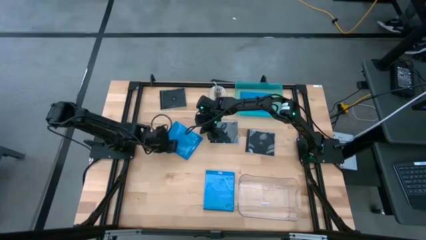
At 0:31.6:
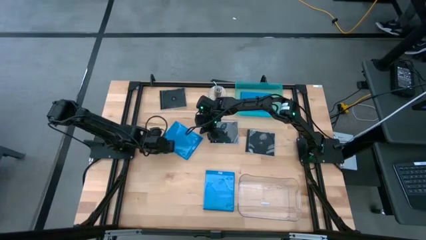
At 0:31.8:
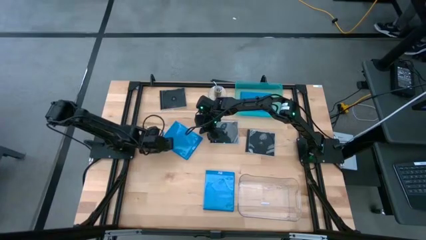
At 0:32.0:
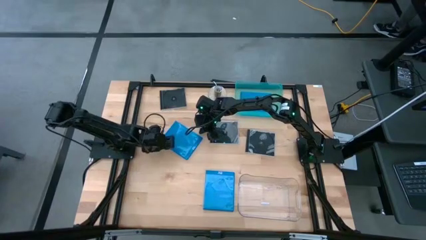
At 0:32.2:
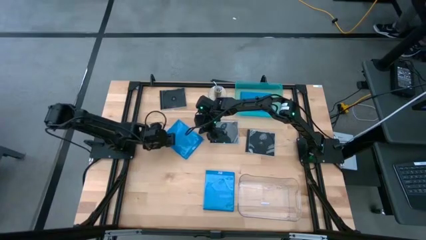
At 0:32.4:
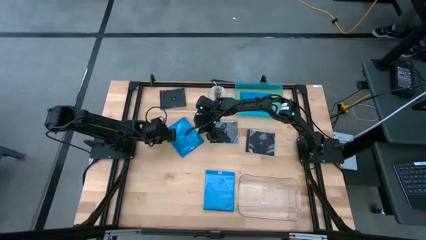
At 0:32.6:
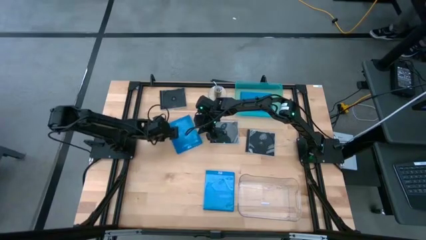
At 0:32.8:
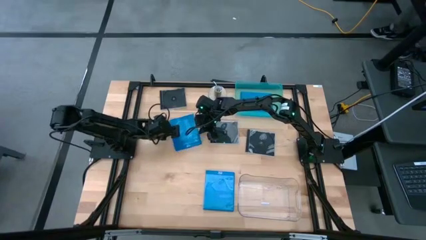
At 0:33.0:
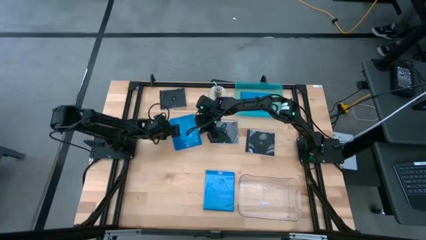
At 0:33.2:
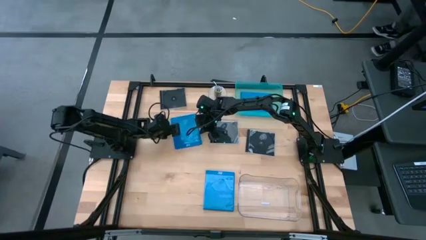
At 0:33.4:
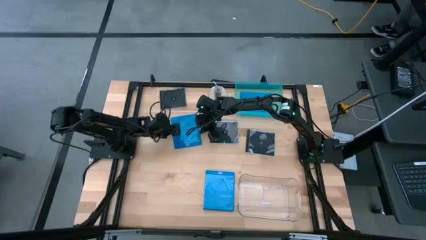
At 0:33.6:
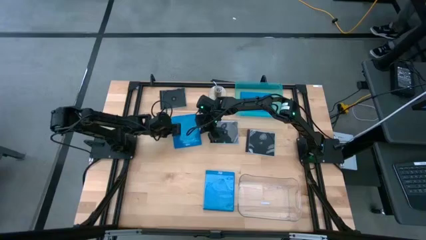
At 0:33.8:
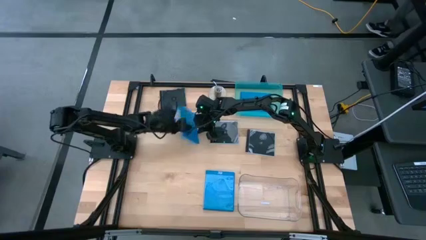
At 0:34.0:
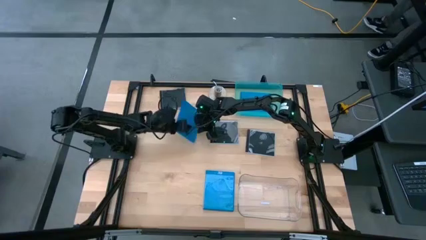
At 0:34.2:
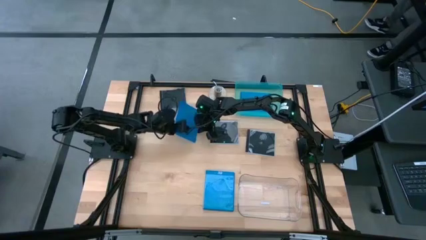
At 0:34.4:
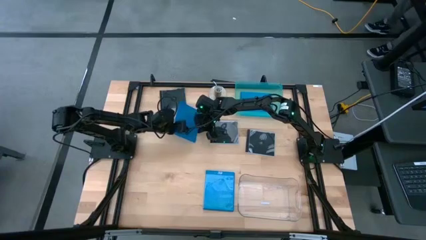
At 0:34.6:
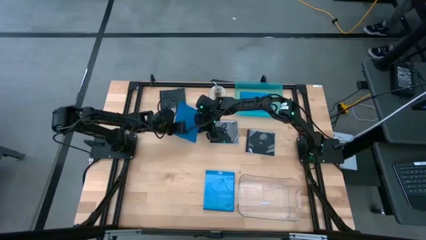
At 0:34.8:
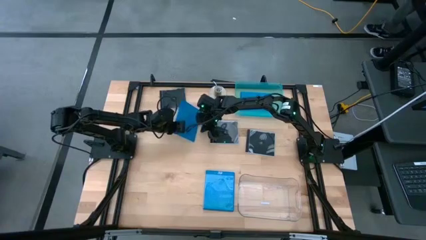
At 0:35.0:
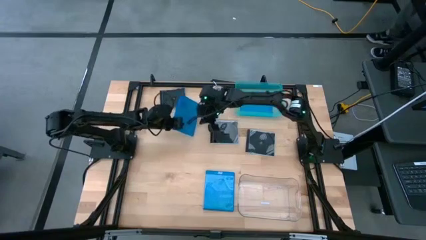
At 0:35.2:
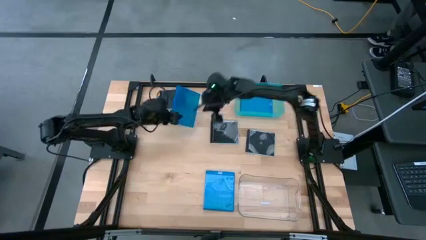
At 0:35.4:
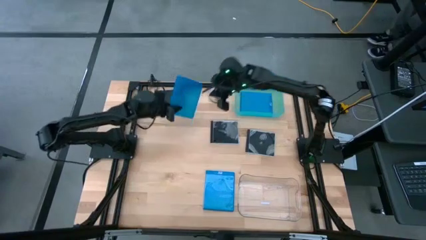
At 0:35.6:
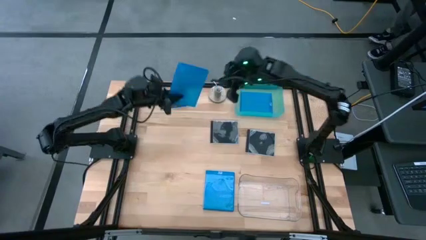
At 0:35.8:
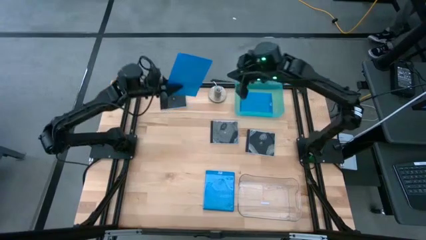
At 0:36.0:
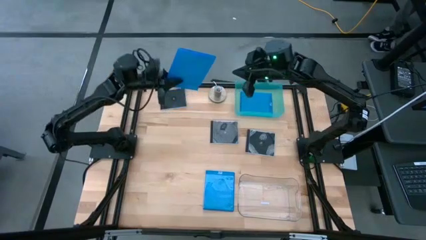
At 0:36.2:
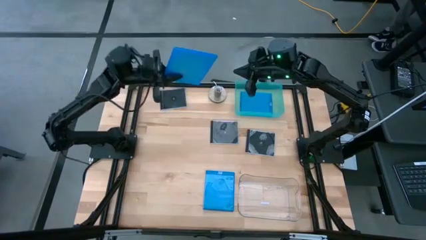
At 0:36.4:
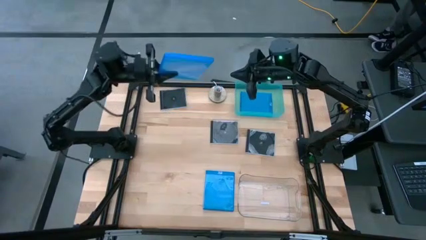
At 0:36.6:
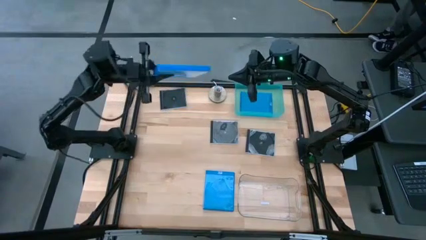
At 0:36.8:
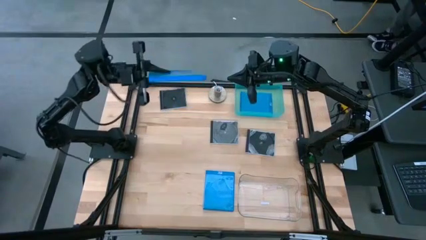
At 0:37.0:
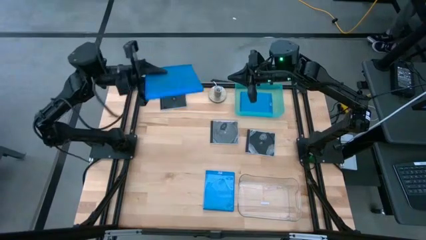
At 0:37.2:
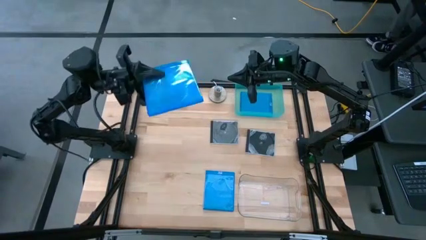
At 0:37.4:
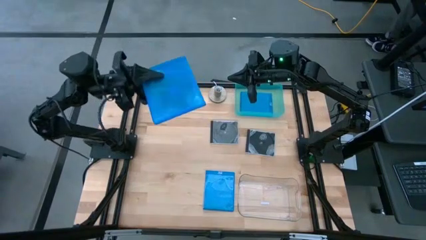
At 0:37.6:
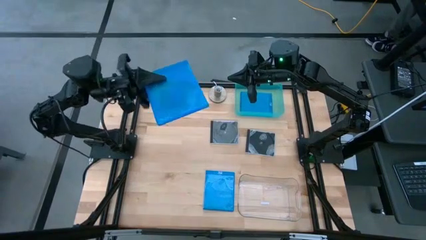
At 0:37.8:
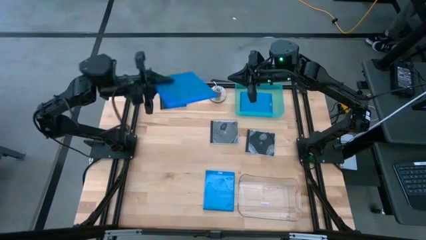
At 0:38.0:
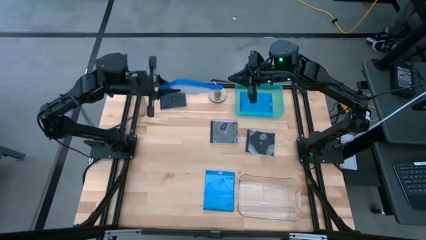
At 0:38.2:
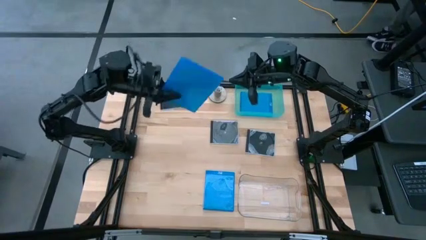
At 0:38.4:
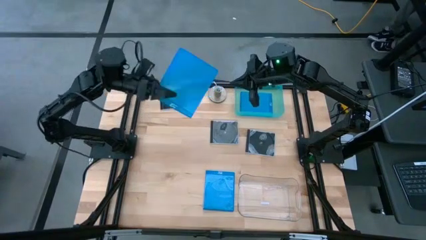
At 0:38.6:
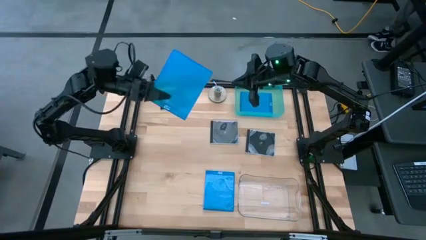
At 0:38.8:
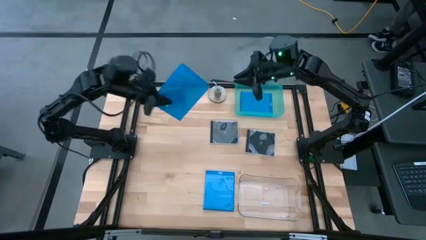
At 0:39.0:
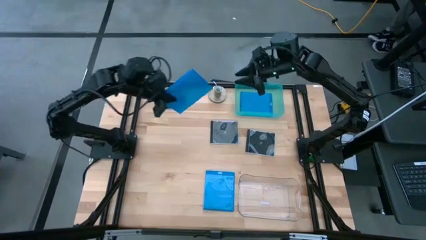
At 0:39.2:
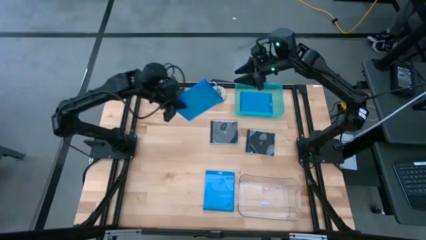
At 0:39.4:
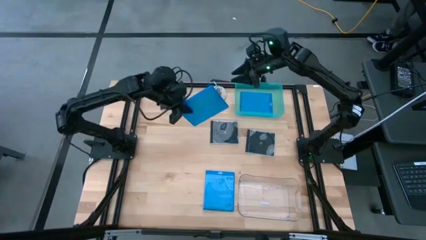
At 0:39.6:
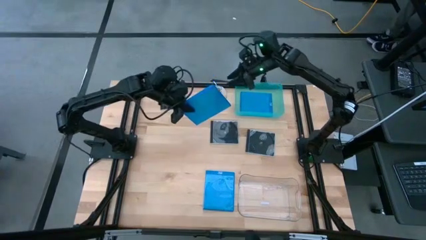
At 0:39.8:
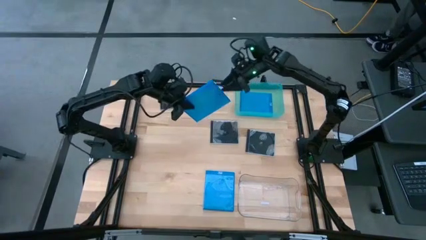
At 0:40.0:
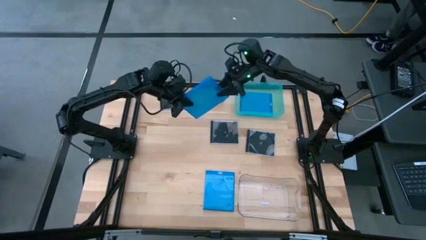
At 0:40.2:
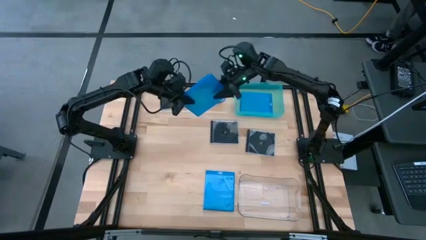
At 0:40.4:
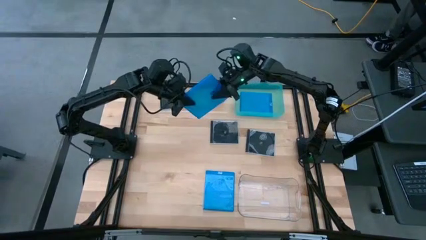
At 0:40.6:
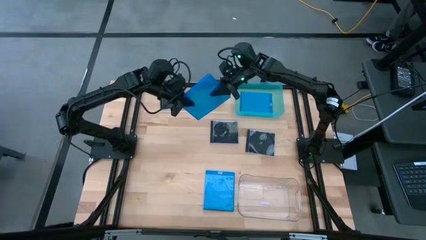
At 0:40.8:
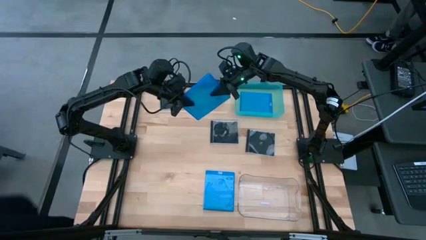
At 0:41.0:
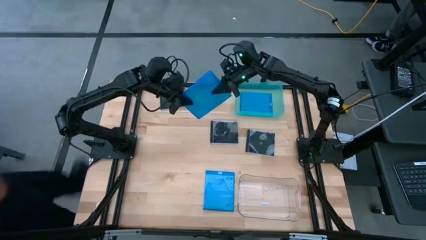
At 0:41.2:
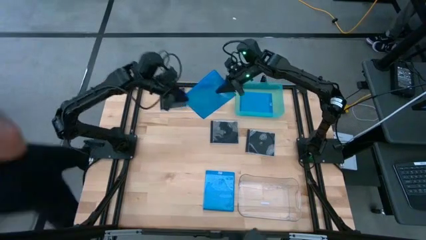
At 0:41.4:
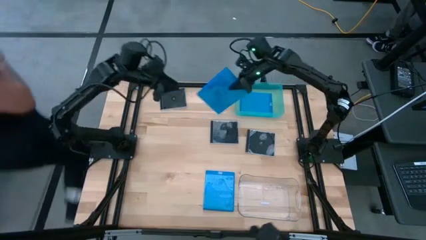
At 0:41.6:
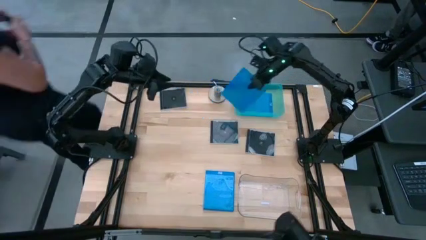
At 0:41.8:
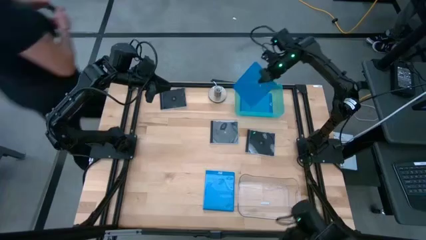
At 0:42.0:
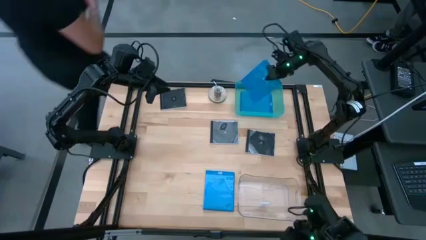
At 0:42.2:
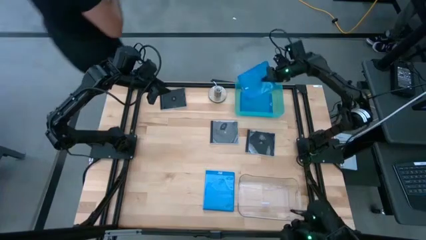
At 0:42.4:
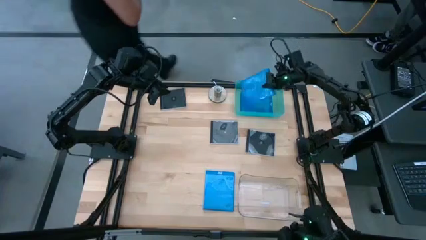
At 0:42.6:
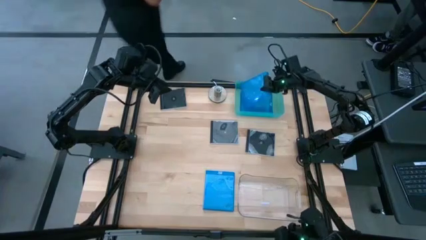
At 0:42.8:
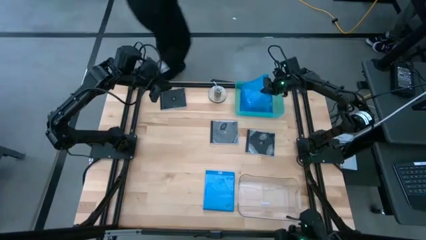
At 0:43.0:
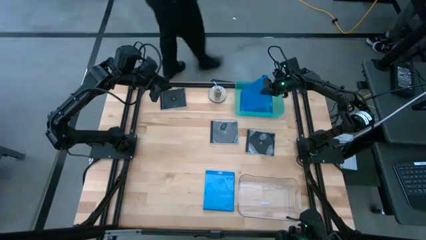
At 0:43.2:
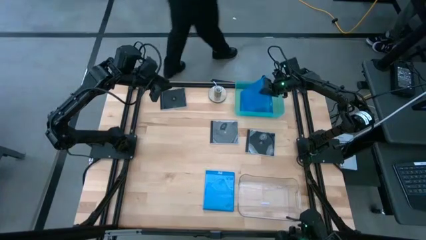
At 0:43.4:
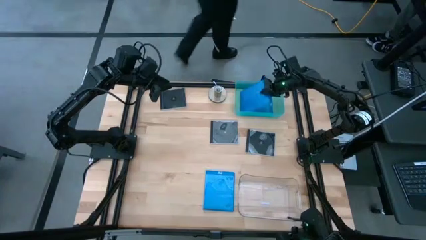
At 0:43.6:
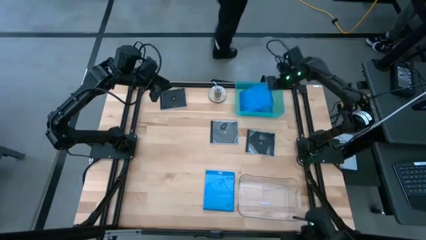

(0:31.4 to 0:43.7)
Task: Pick & place jewel cases by type
Put the left blue CD case into the blue bin
